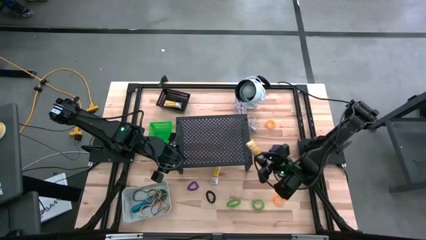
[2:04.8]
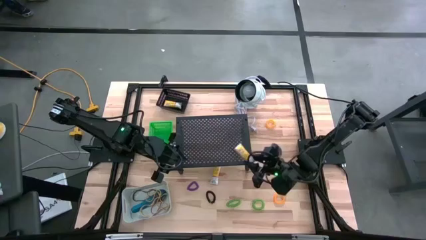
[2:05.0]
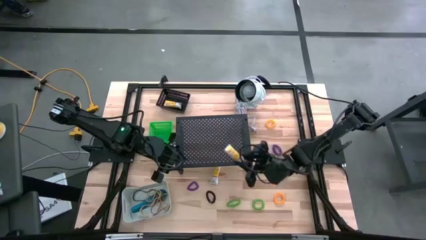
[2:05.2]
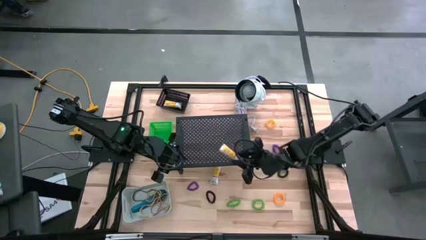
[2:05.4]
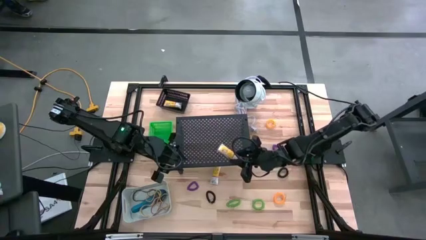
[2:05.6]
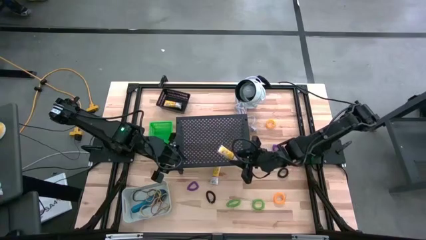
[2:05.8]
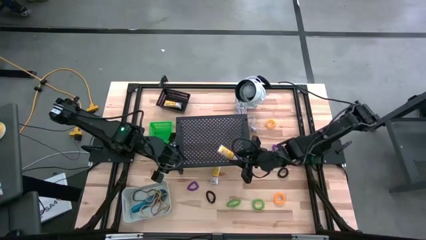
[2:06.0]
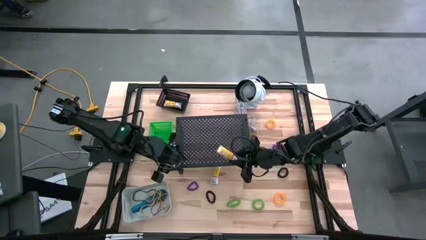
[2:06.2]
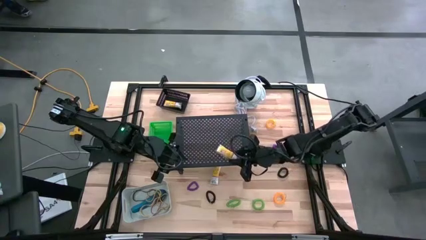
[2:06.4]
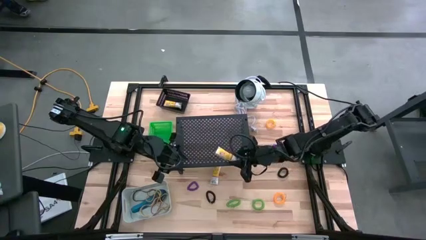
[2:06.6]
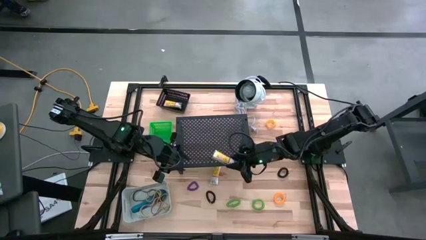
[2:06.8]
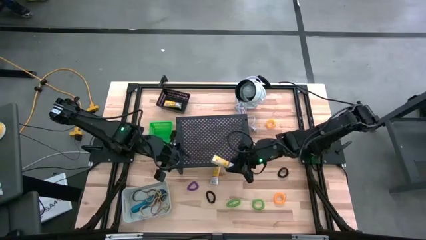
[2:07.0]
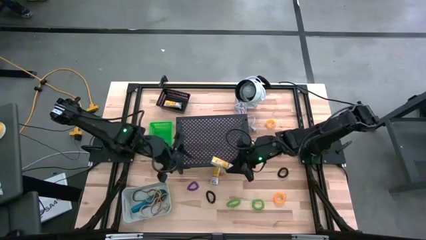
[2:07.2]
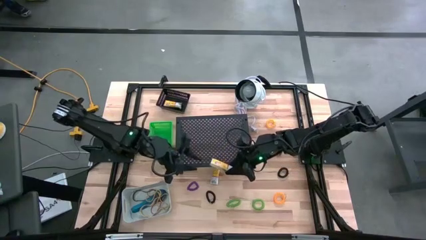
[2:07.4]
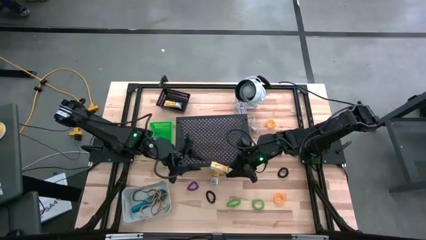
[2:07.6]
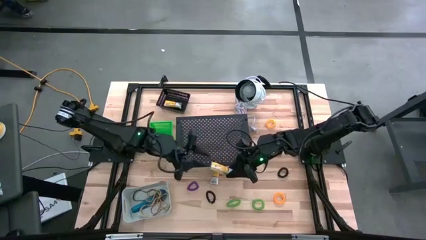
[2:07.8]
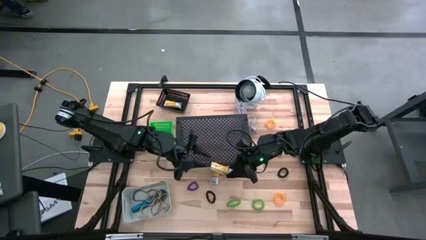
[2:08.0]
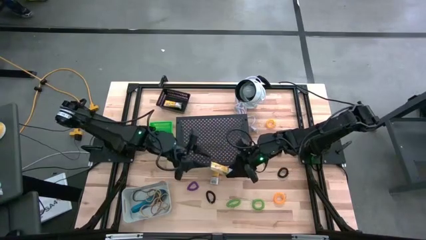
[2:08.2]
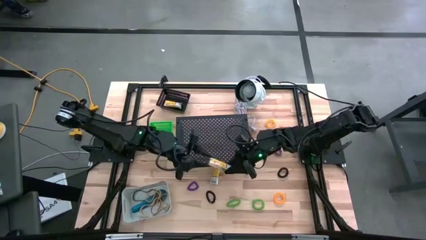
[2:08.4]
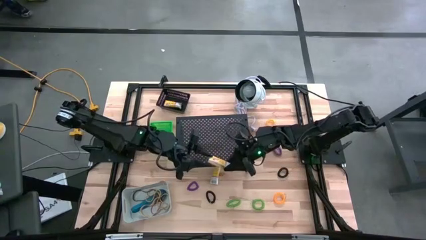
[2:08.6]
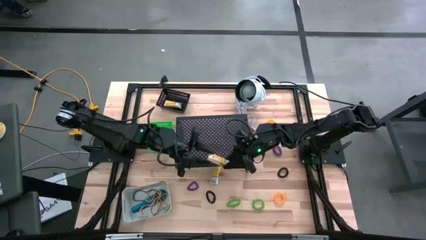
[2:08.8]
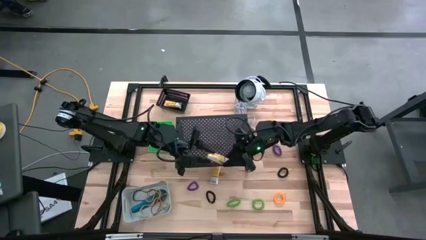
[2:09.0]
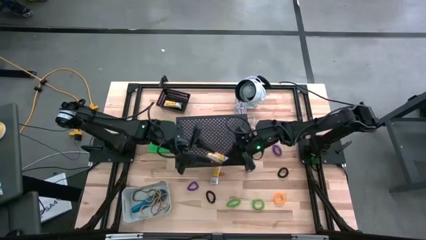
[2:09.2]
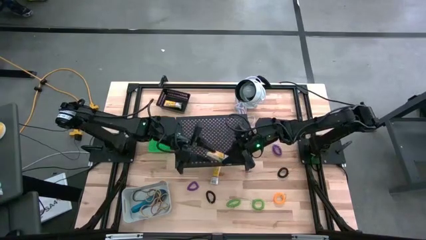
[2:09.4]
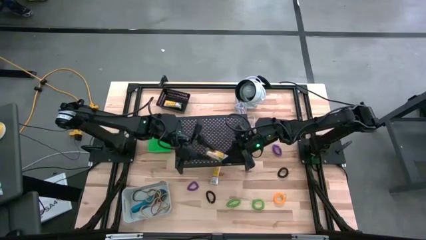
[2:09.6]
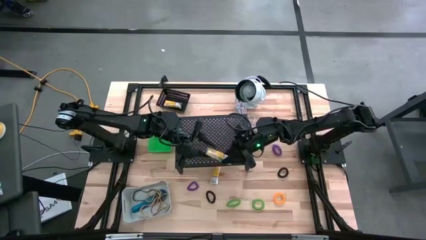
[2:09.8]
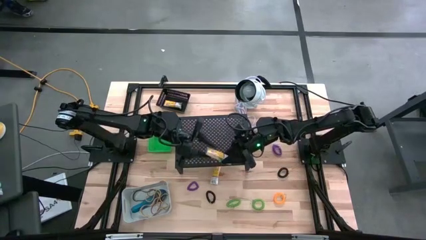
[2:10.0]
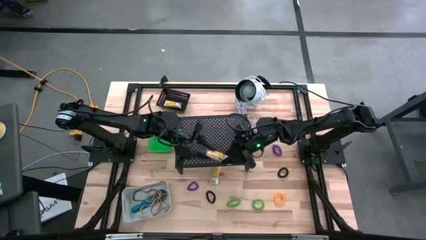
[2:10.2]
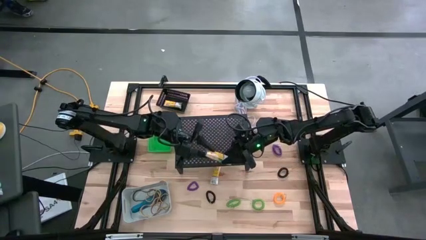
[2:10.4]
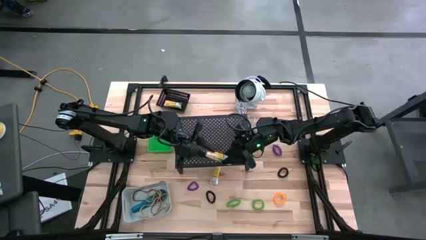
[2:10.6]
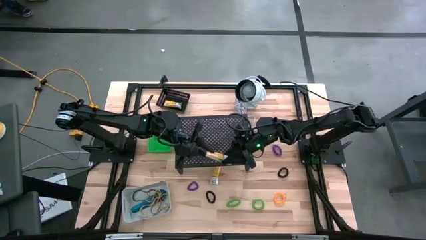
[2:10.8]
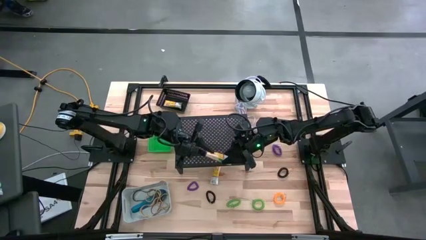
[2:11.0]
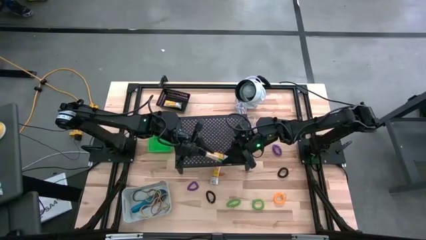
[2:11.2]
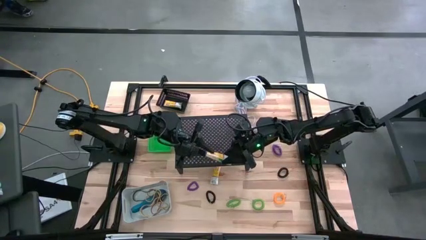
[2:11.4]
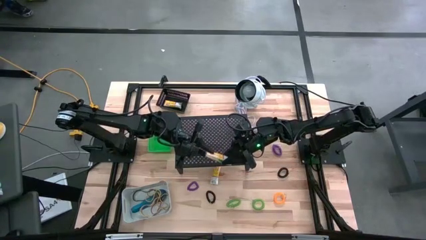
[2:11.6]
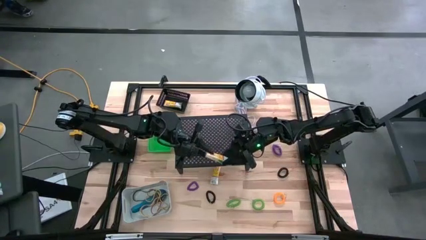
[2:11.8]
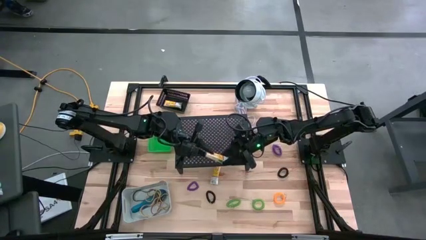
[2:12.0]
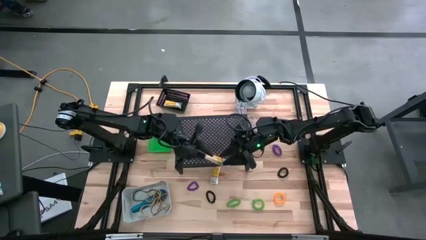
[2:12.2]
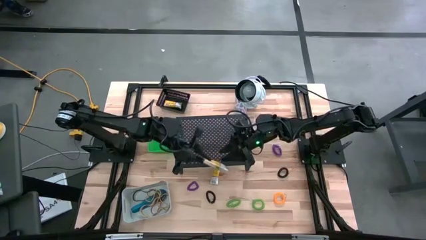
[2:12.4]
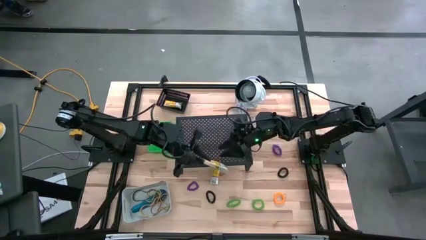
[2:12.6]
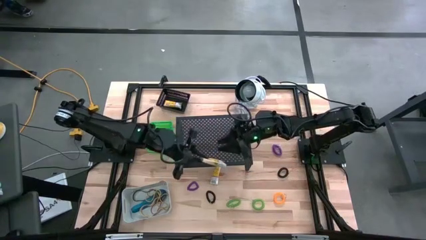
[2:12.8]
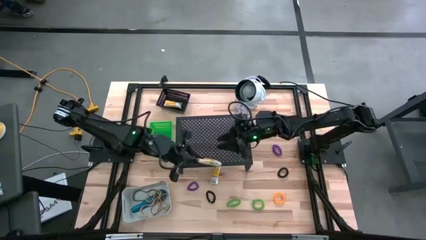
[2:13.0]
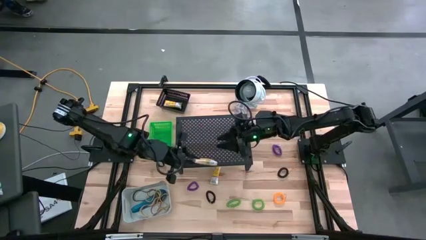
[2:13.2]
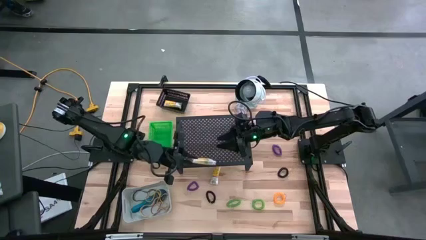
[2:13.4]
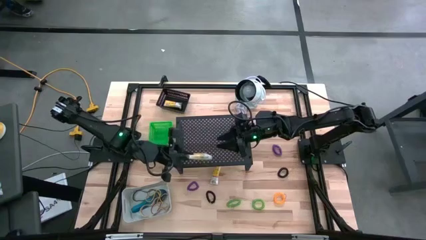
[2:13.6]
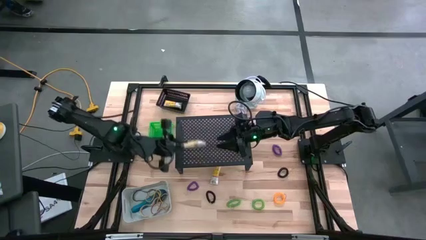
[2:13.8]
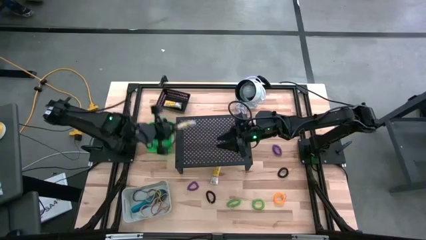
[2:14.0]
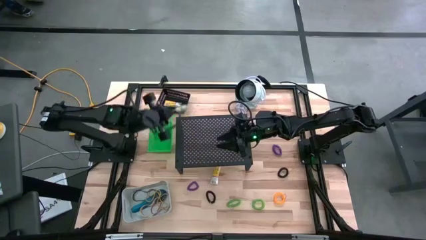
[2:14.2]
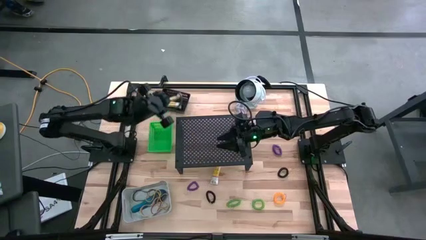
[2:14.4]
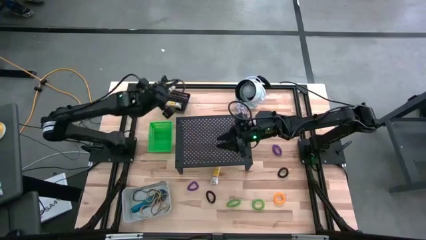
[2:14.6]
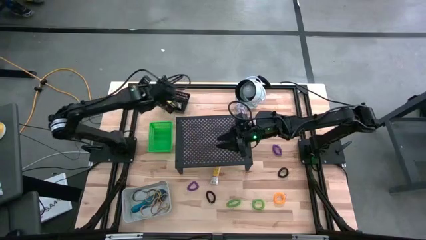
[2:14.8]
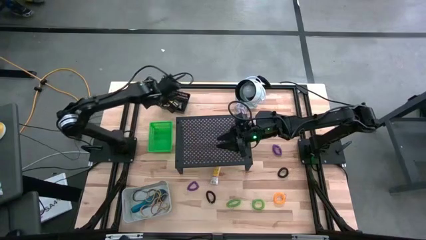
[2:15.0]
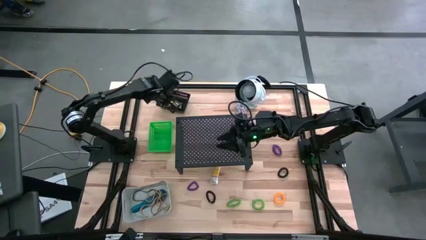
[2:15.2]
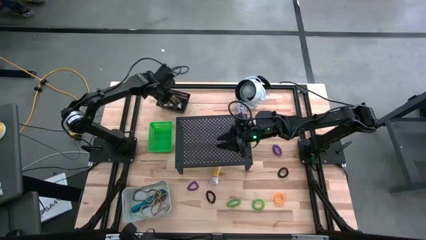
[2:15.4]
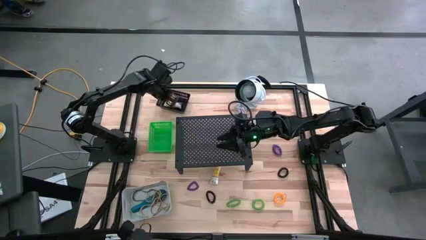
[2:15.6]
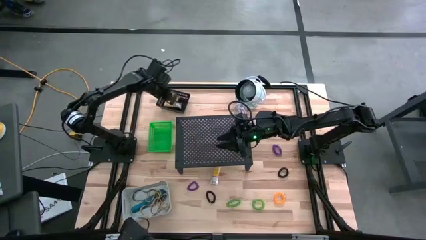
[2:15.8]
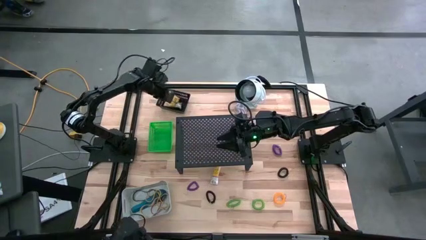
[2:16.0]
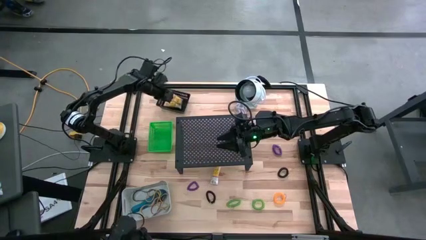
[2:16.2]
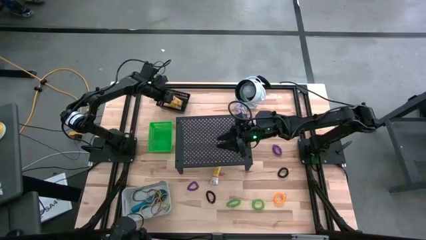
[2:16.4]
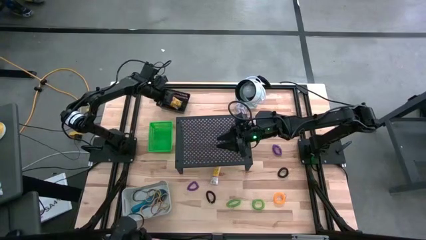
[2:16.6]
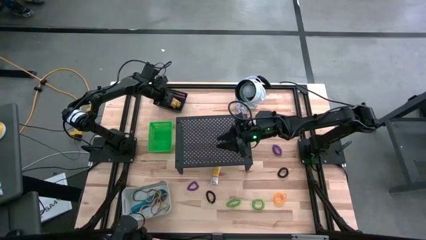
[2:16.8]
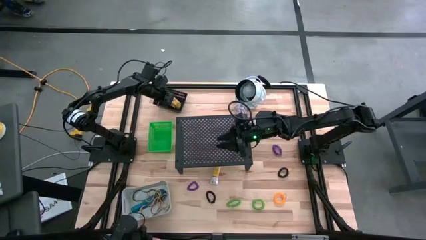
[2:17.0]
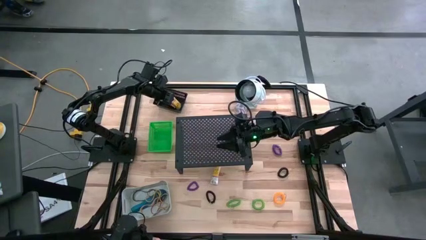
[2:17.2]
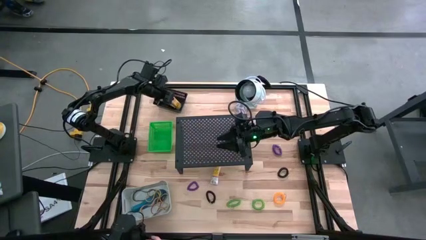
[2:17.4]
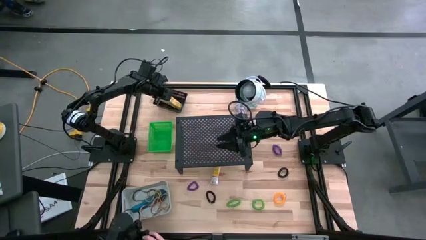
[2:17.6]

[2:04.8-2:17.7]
Task: Pick & Place Office Desk Supplies
Put the right crayon box into the black bin

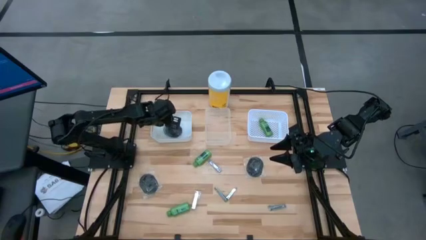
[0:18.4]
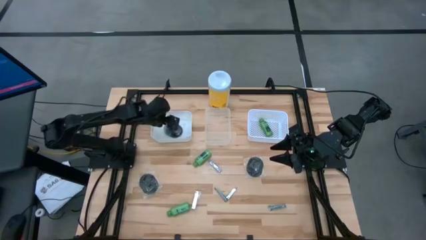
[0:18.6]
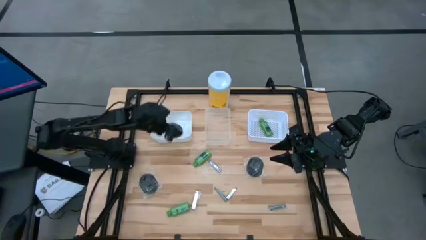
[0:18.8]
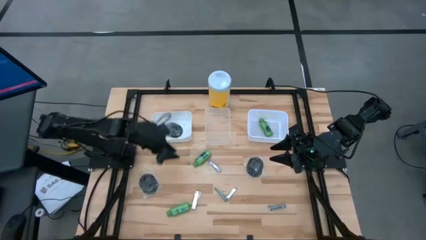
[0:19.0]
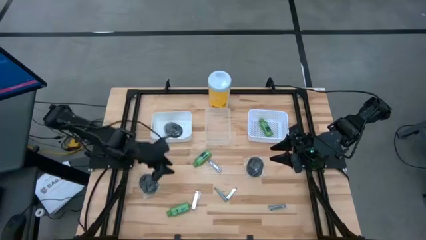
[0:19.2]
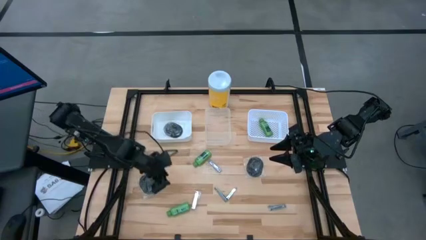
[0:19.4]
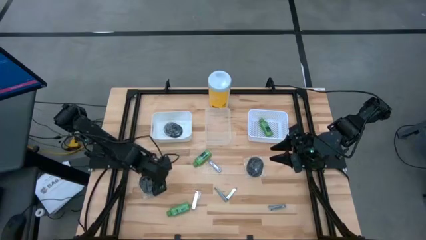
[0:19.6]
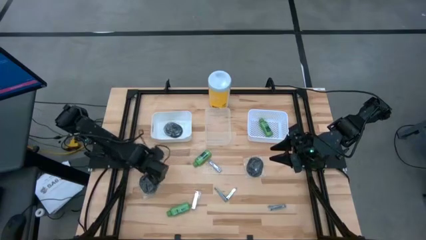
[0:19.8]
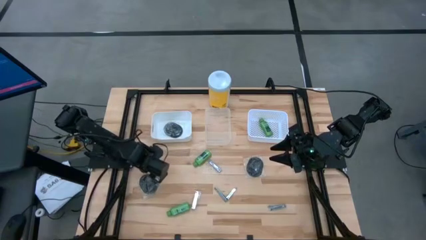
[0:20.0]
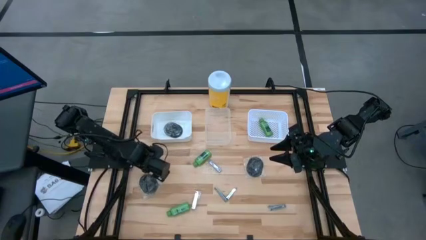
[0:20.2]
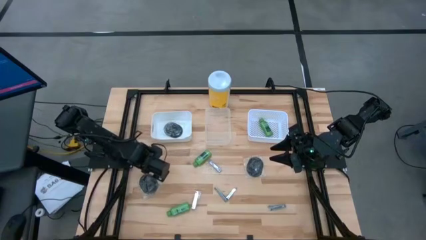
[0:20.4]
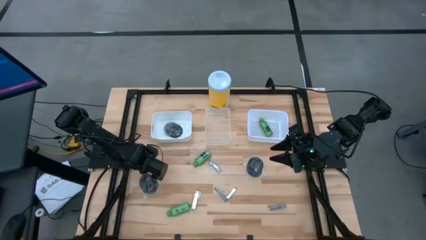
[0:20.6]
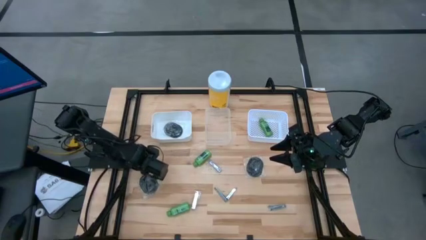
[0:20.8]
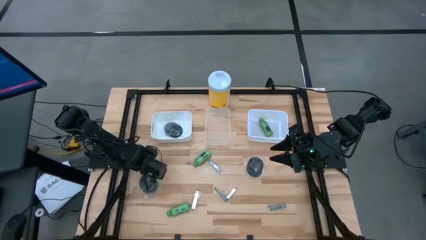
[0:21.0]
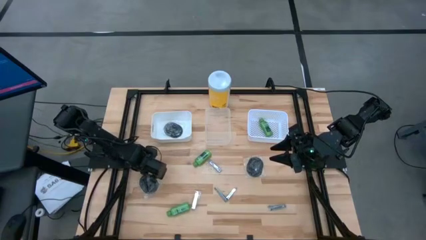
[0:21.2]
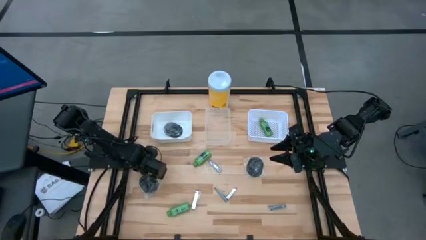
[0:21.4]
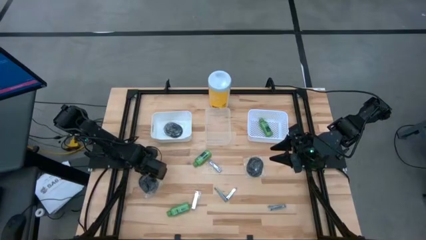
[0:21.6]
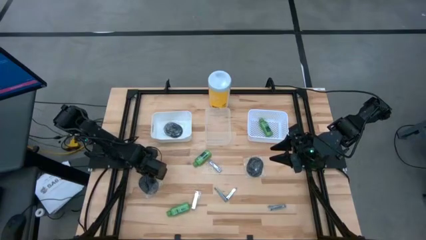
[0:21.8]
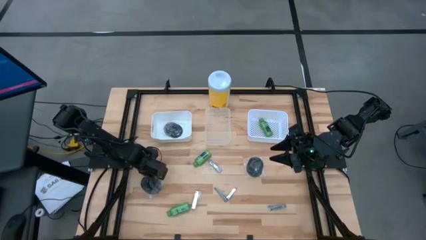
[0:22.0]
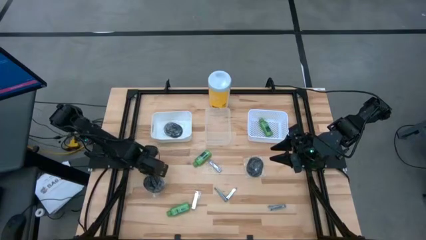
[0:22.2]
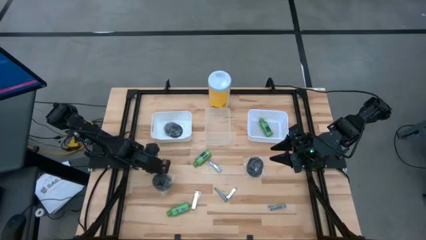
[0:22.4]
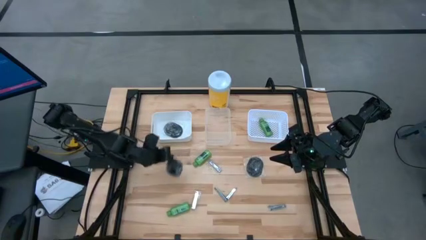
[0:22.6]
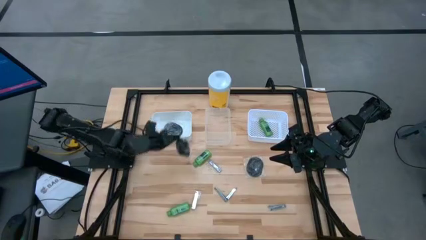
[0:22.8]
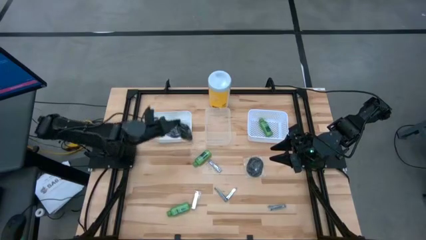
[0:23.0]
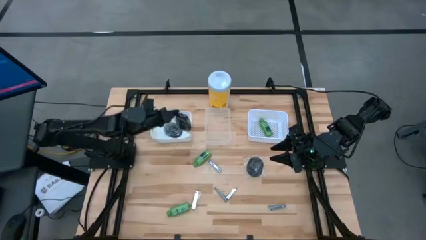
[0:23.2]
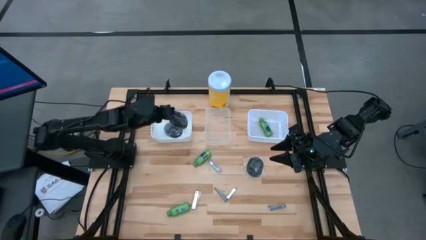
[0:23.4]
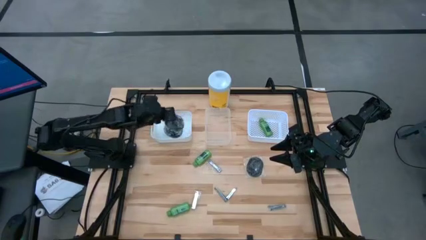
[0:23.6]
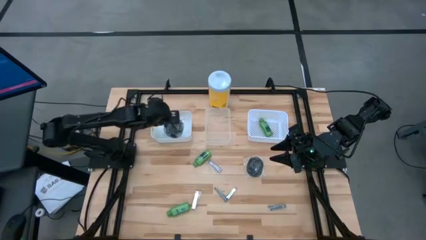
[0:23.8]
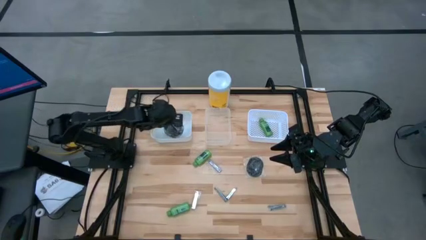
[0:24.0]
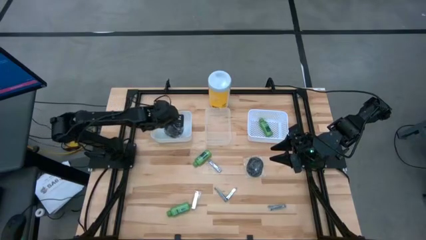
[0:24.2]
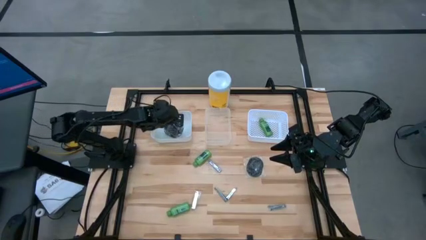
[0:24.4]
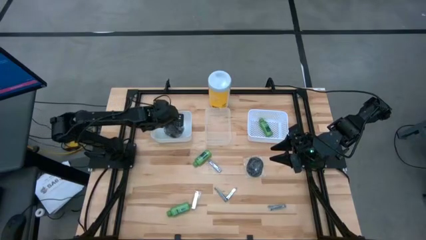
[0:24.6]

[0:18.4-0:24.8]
Task: Pick & Place Travel size toiletries
Put the black hairbrush into the left white bin
